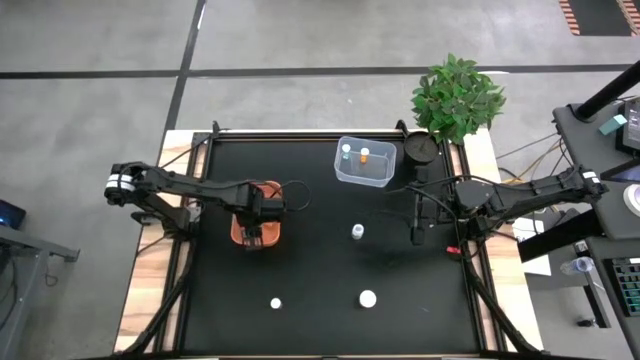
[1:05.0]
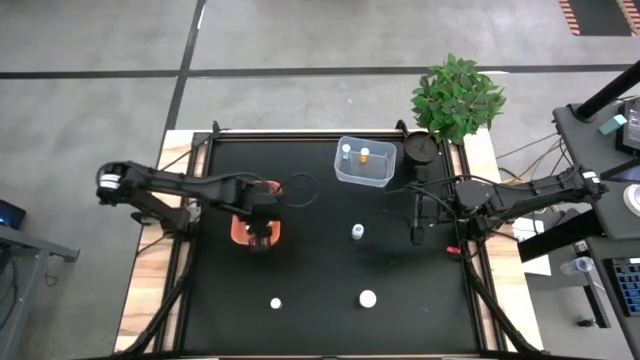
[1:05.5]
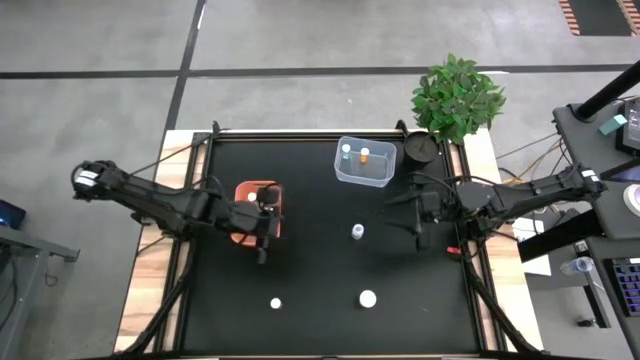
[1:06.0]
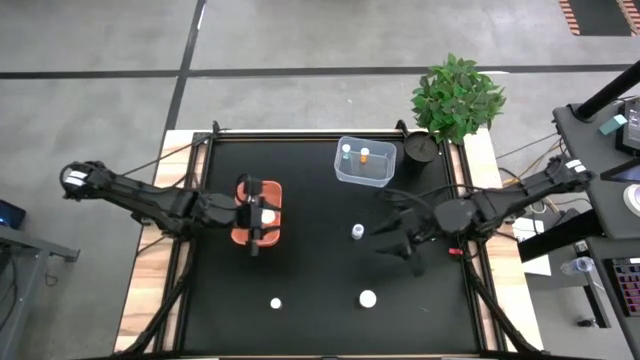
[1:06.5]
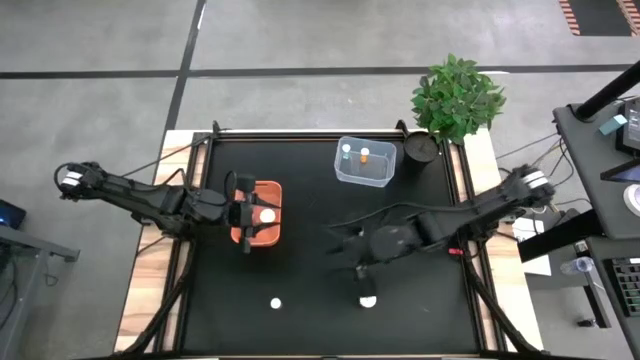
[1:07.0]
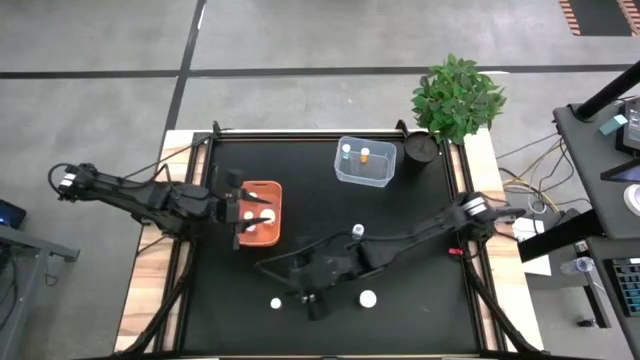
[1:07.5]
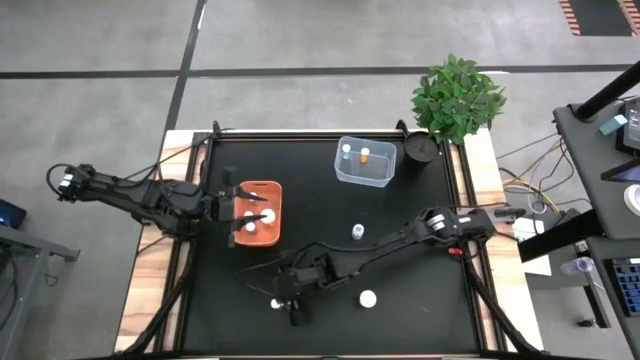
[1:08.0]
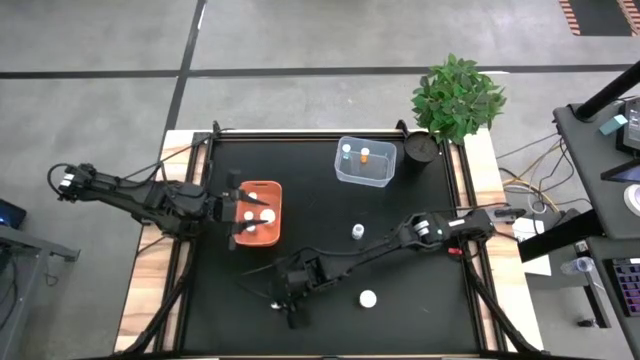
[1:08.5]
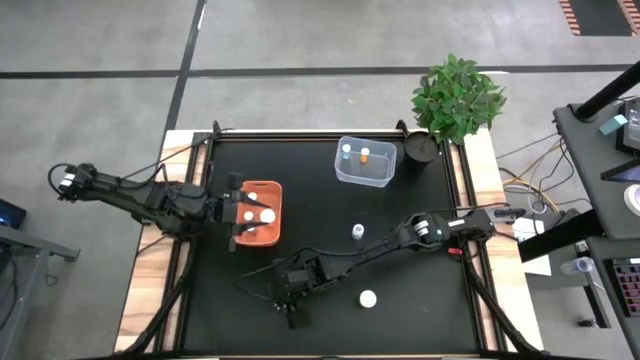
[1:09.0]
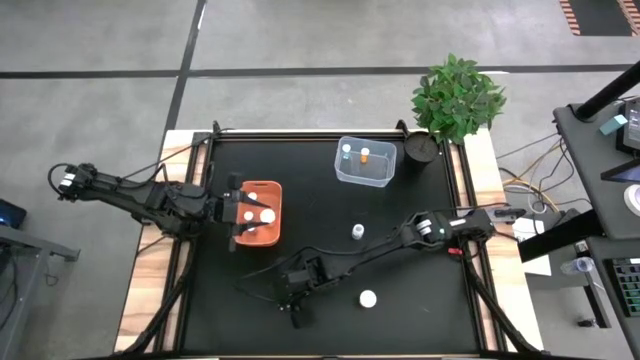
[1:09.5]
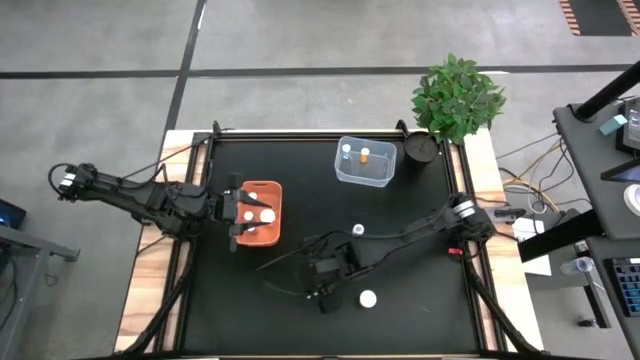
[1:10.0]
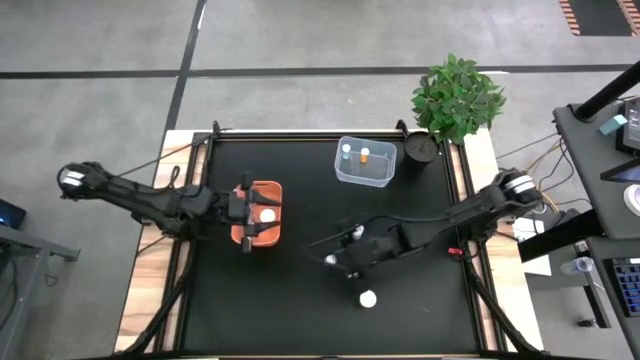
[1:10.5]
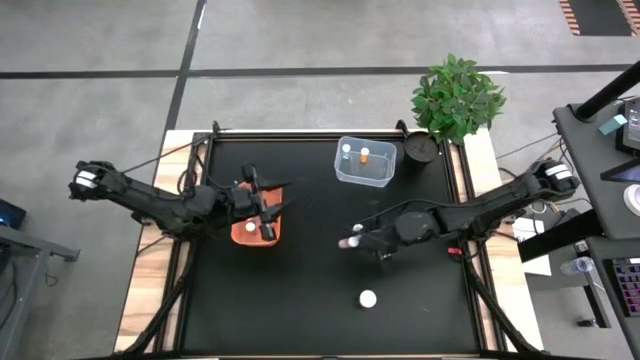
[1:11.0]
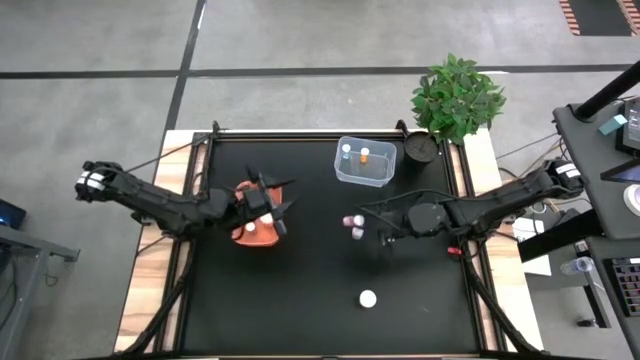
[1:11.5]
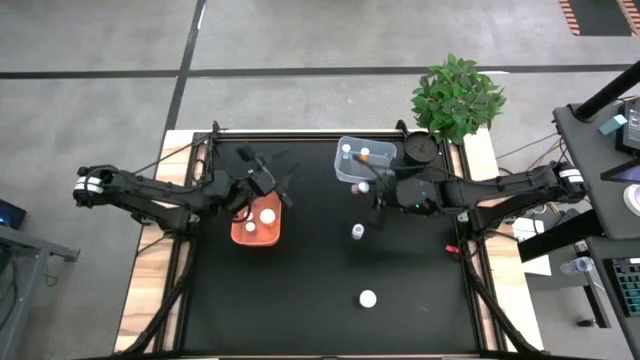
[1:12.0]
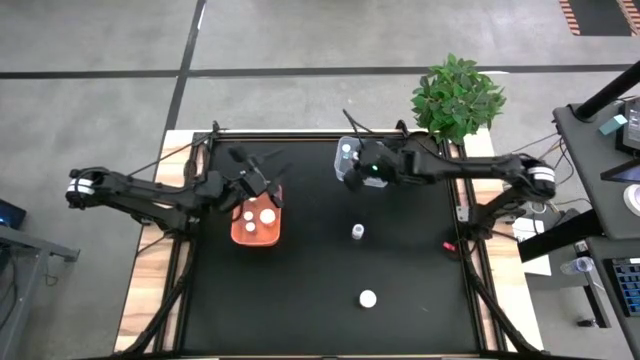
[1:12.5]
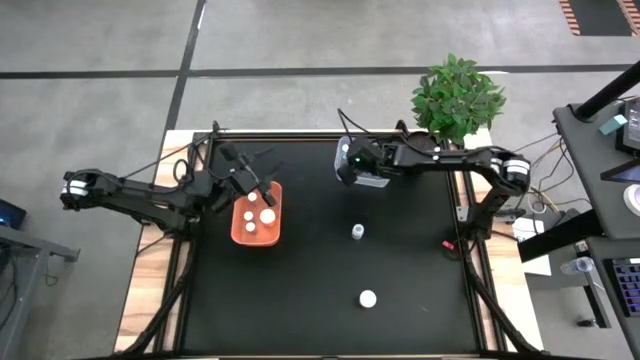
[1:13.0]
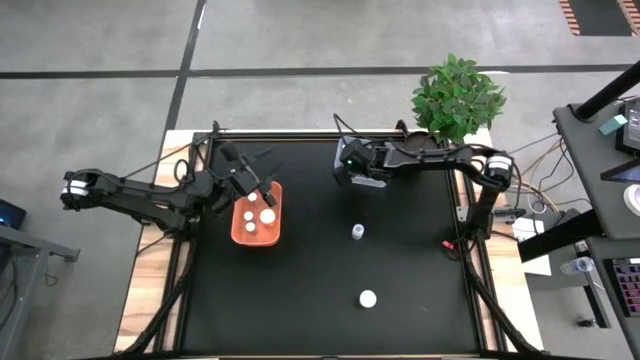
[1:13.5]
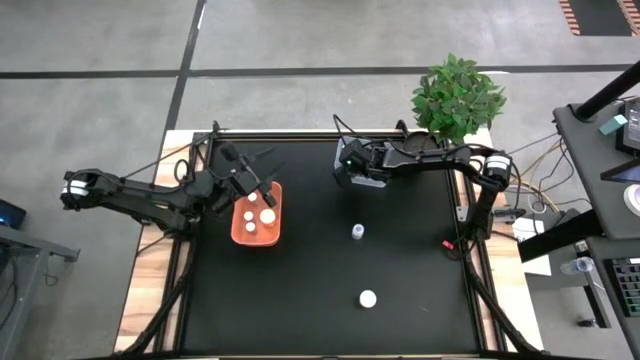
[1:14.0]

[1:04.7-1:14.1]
Task: Pick and place medicine bottles into bin by pill shape (circle, oval)
Put the pink tablet pill bottle into the transparent bin

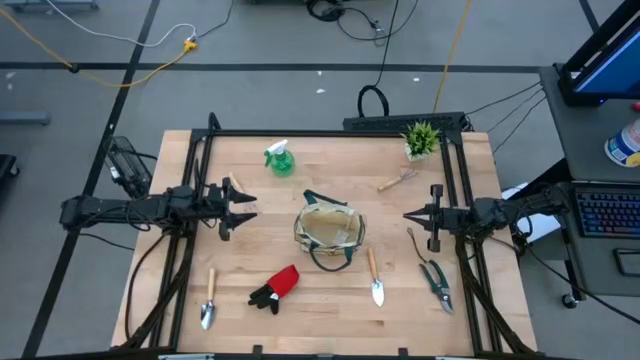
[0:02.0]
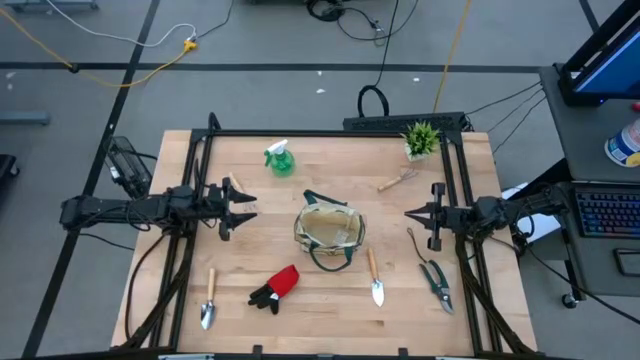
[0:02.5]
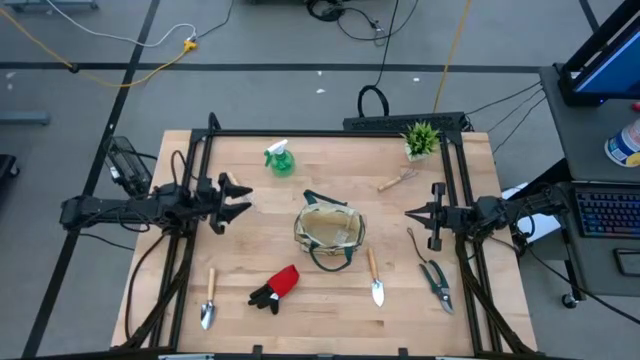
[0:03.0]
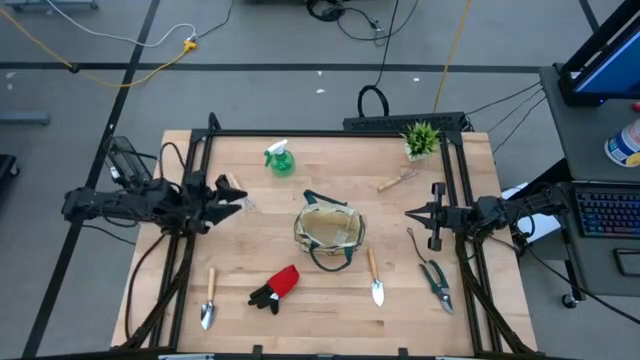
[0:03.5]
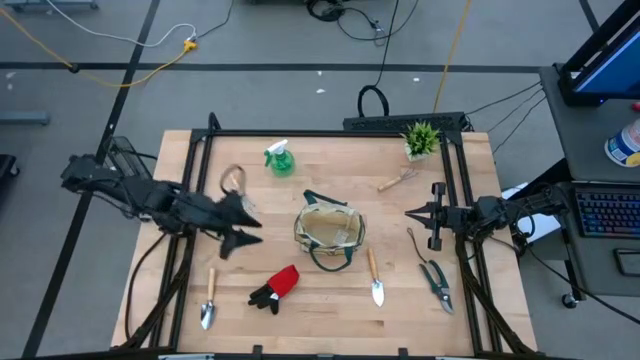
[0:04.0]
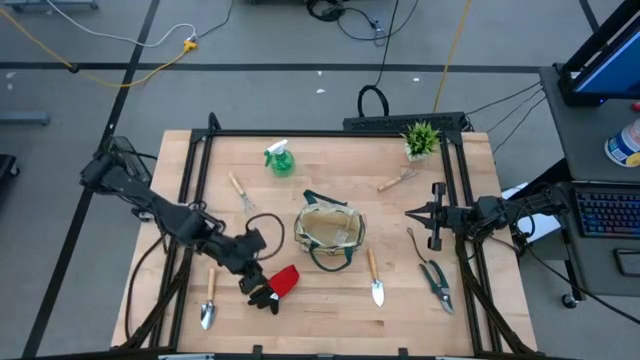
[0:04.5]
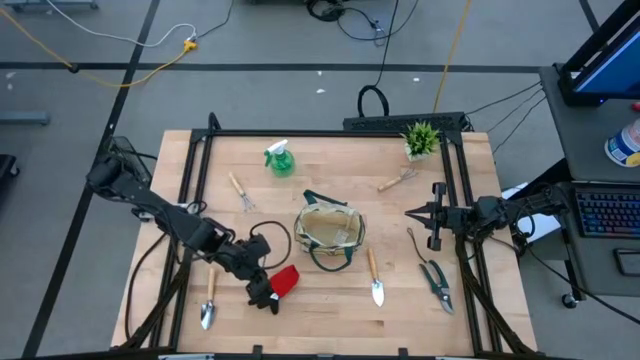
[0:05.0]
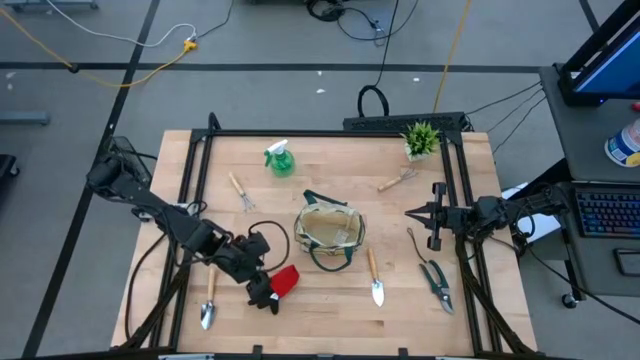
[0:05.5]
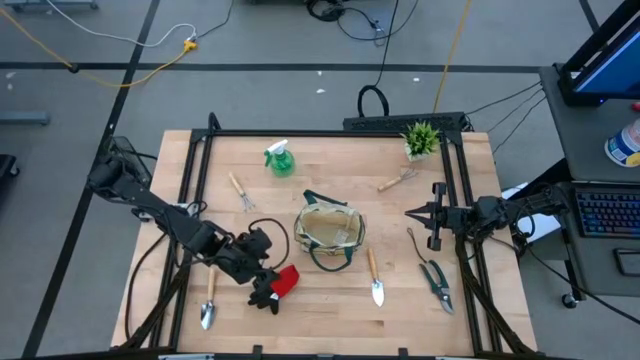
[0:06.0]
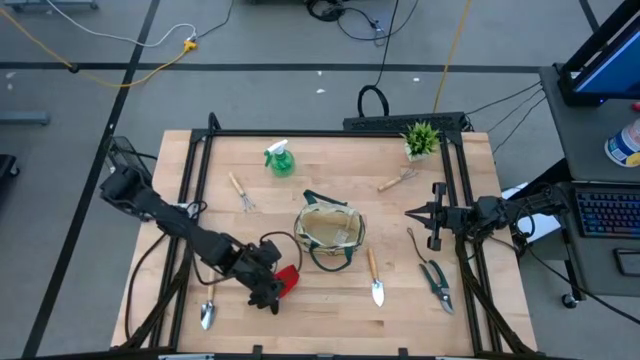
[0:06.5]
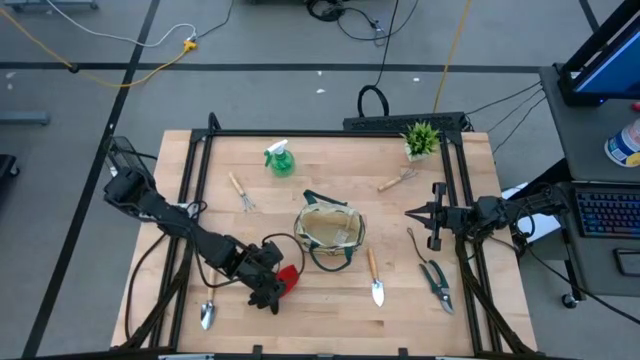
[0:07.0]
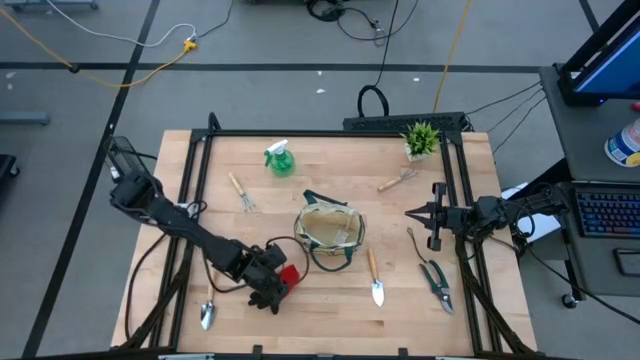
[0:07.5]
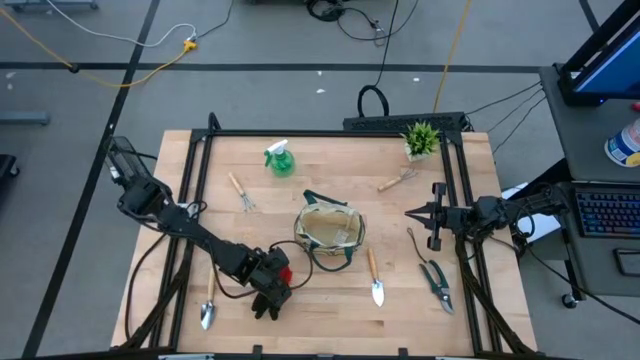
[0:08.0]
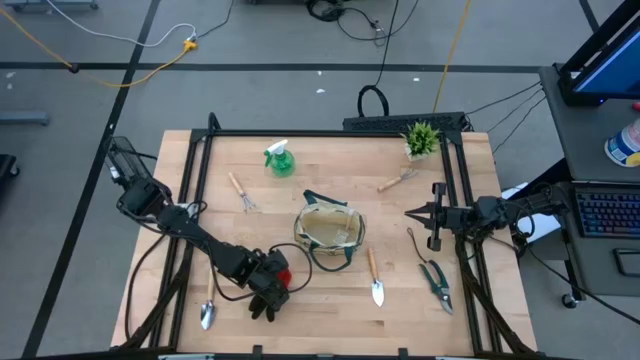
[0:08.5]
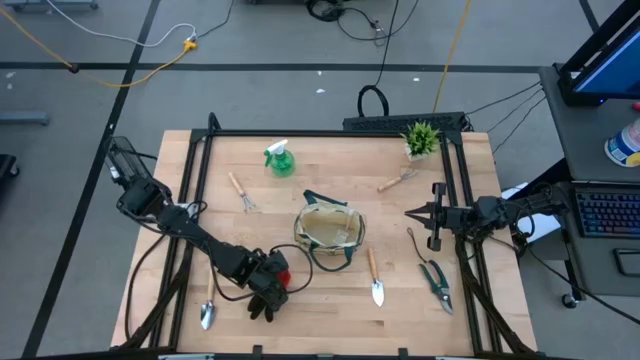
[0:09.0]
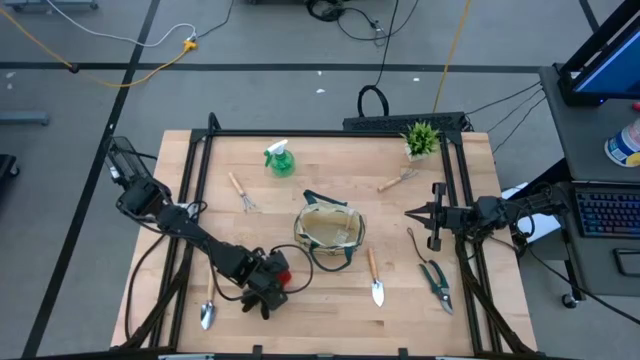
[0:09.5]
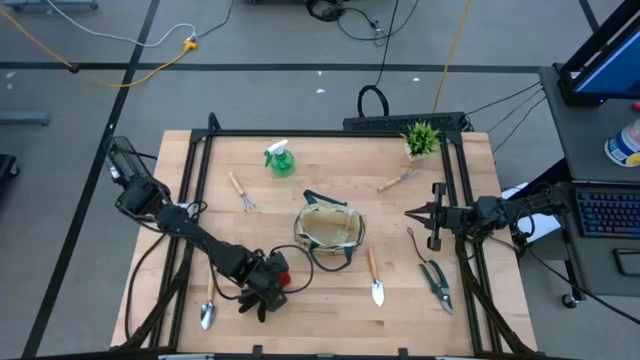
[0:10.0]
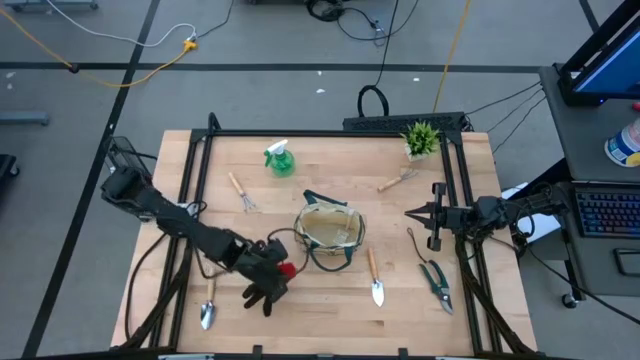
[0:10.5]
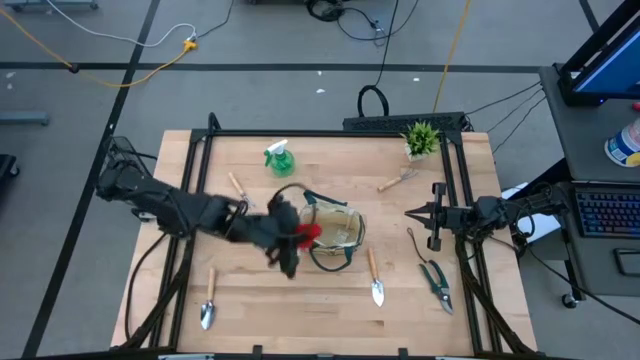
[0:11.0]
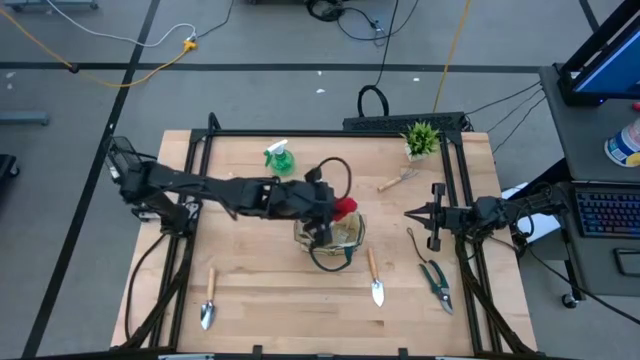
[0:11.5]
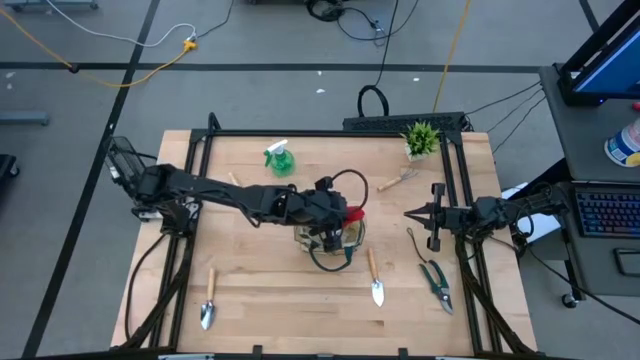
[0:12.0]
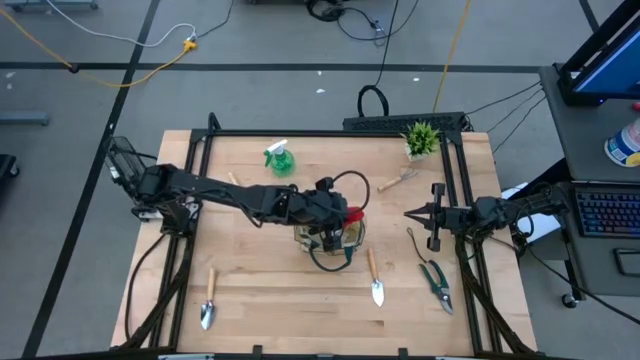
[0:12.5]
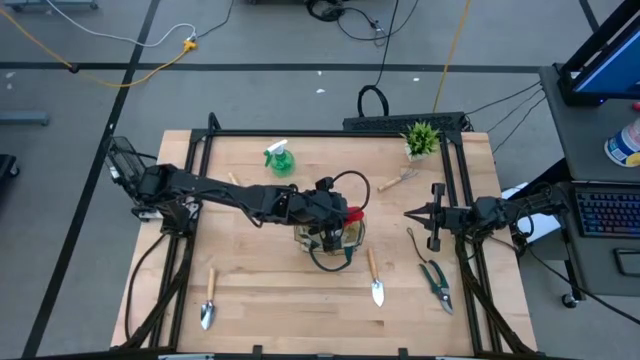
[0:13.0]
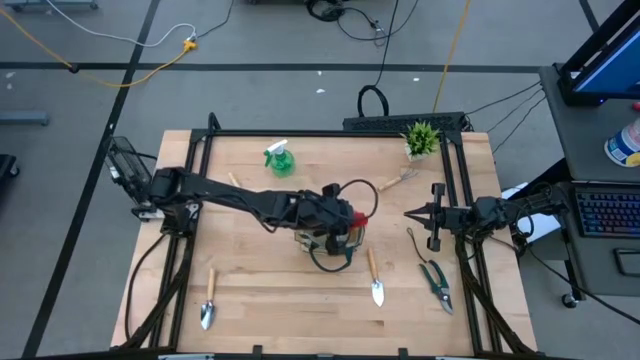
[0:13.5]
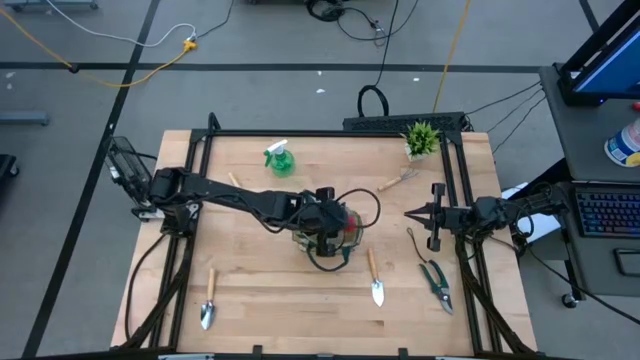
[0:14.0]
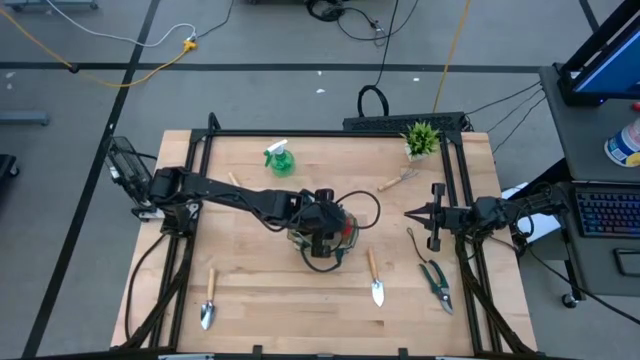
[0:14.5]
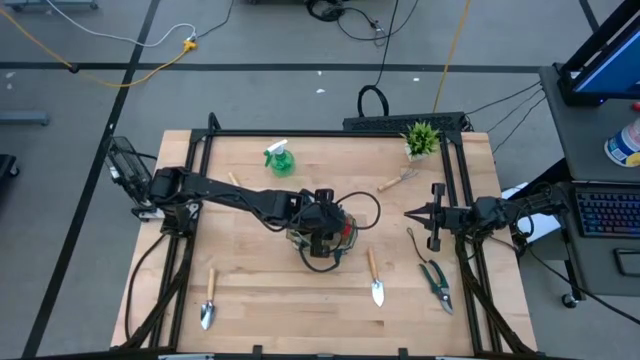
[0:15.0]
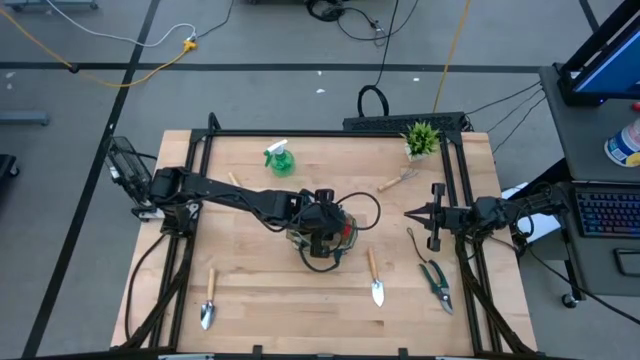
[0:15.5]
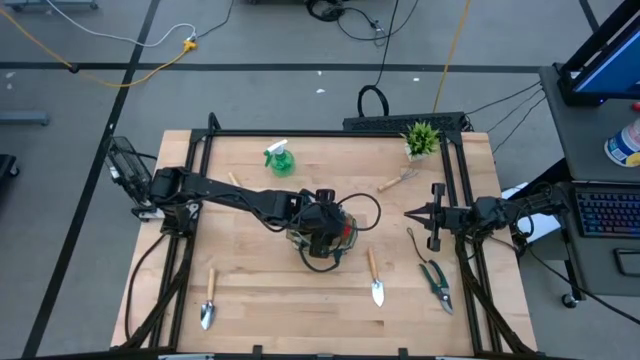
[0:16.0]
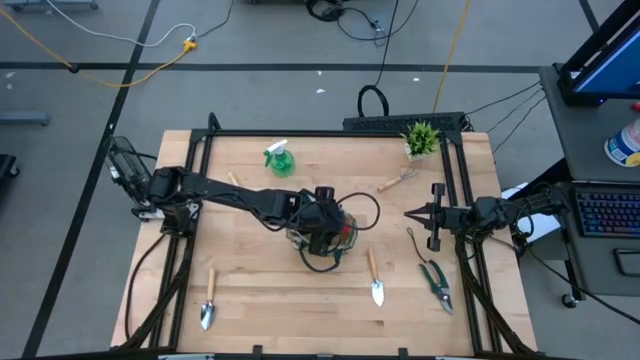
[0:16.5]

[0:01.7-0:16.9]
Task: Pick & Place Garden tools in Gardening bag
Put the red gloves into the gardening bag
